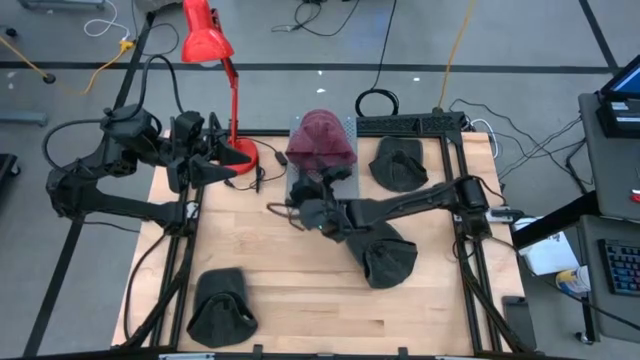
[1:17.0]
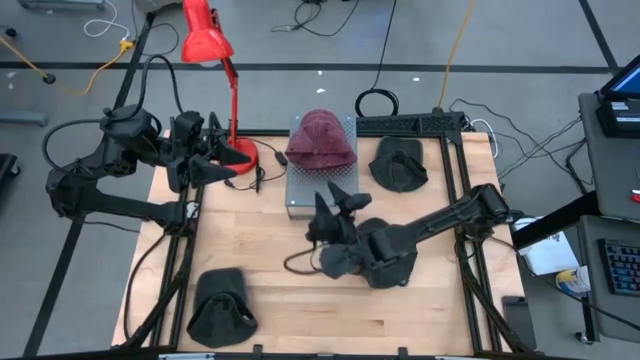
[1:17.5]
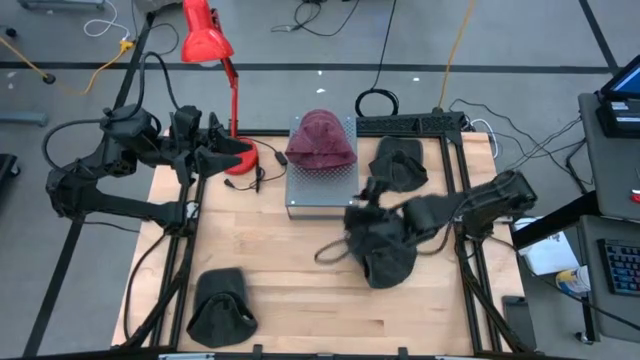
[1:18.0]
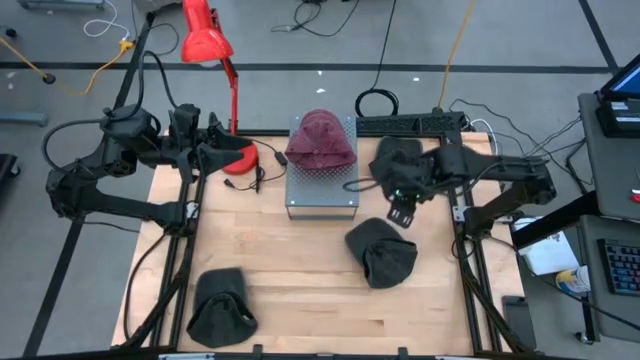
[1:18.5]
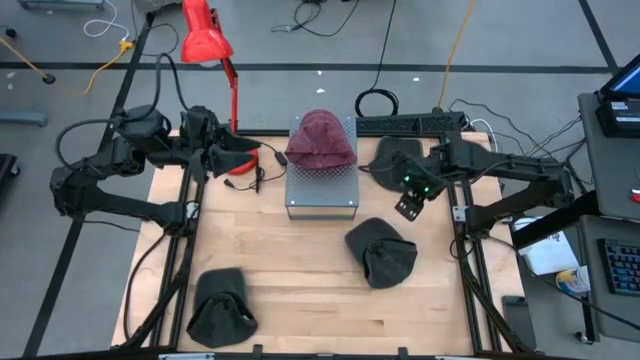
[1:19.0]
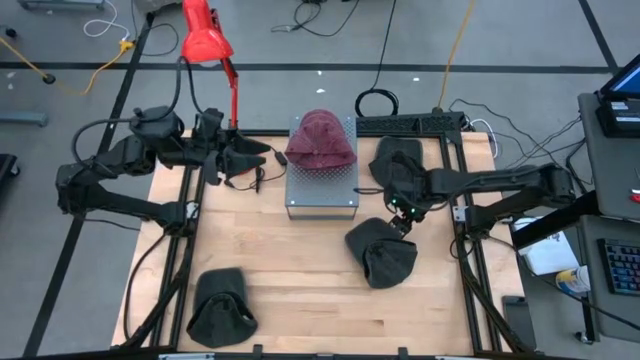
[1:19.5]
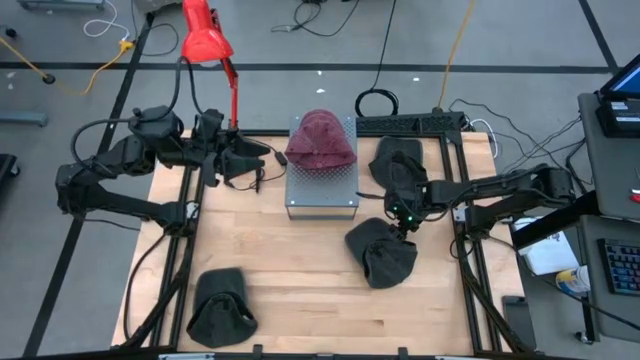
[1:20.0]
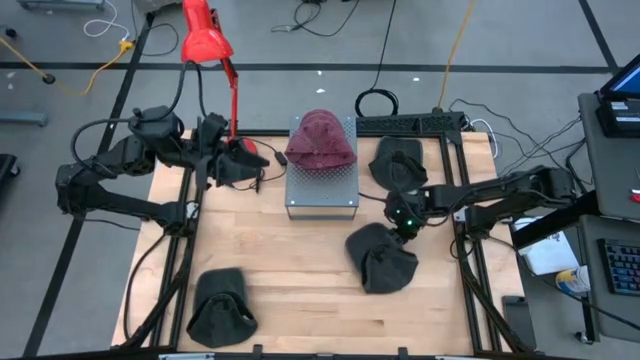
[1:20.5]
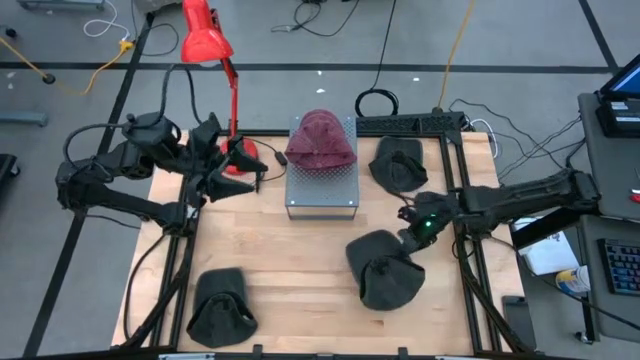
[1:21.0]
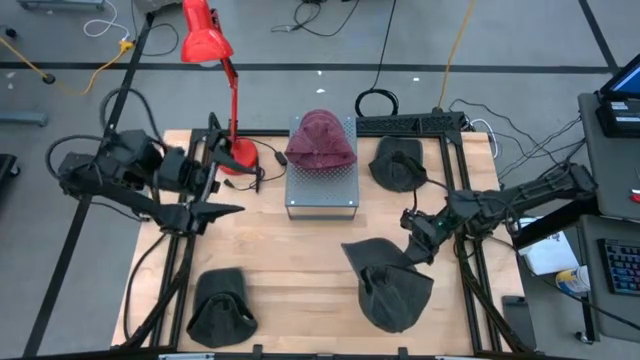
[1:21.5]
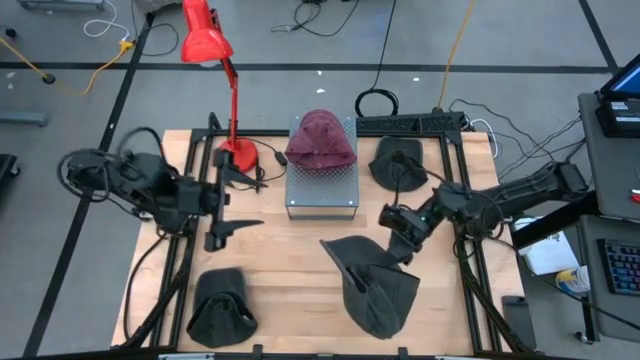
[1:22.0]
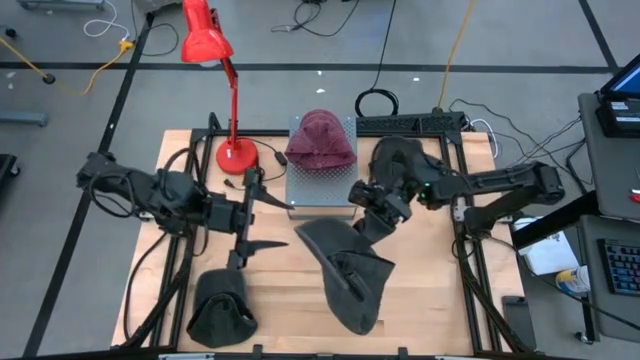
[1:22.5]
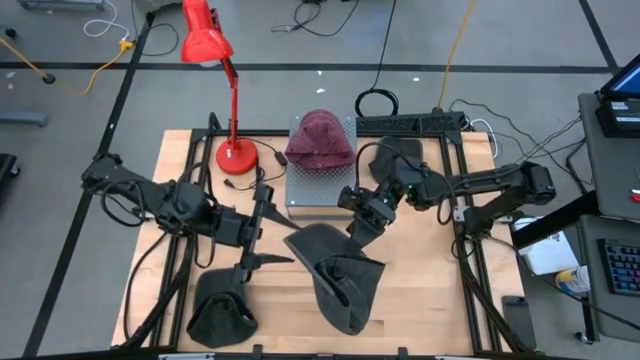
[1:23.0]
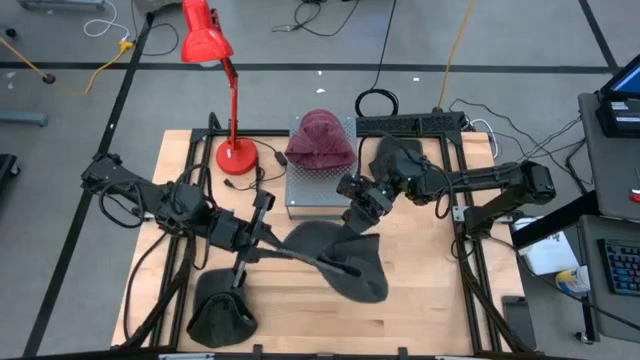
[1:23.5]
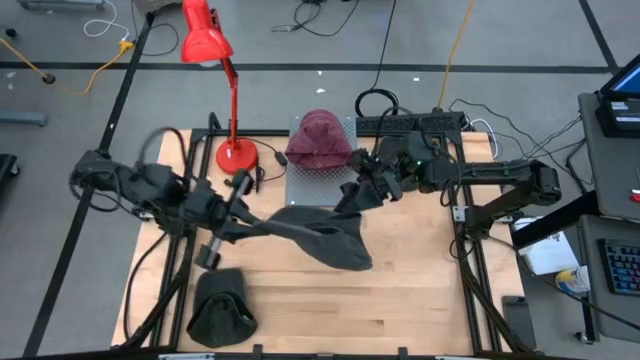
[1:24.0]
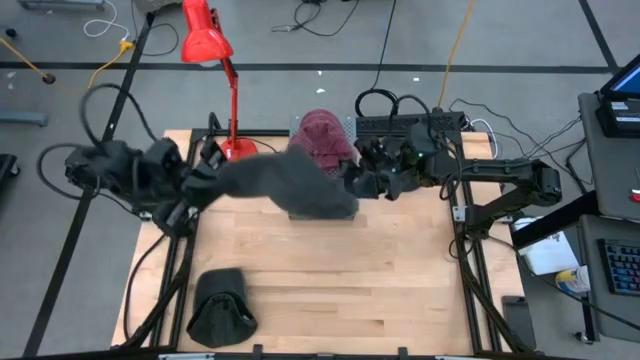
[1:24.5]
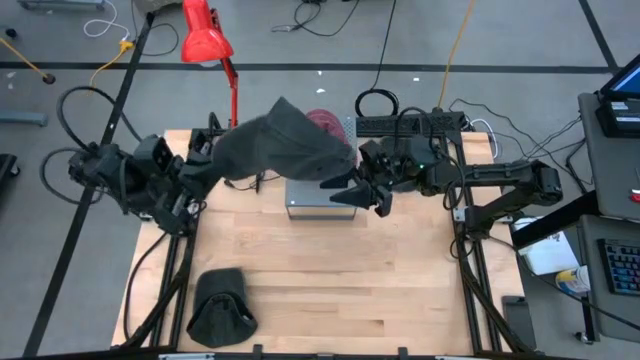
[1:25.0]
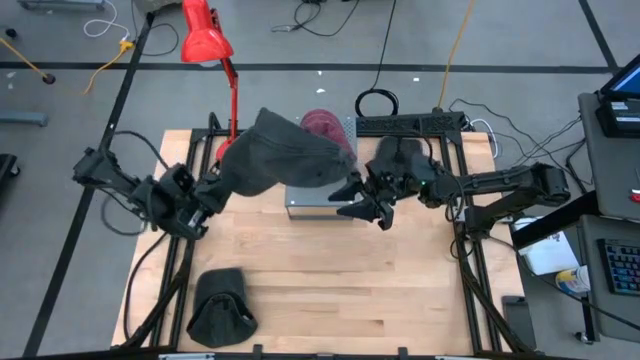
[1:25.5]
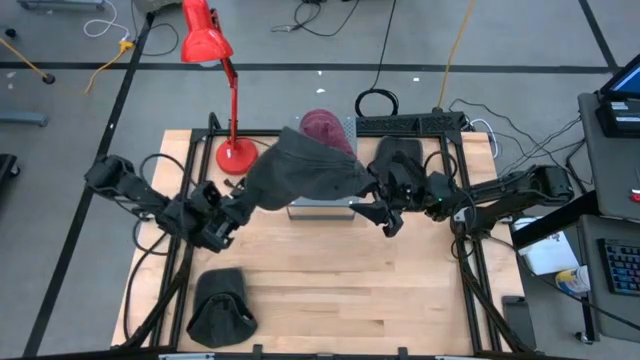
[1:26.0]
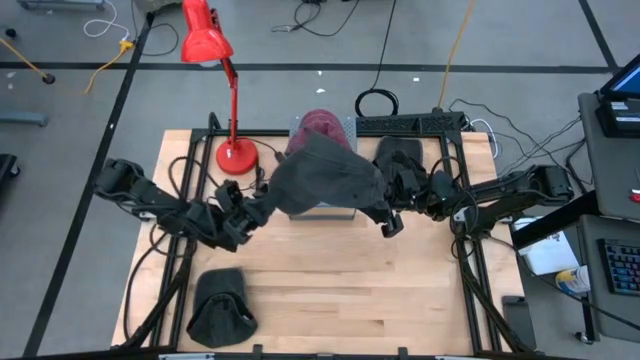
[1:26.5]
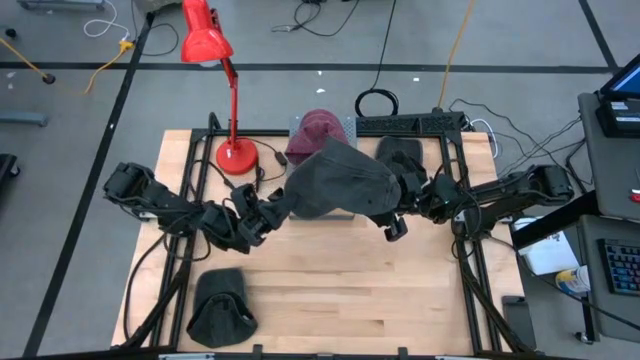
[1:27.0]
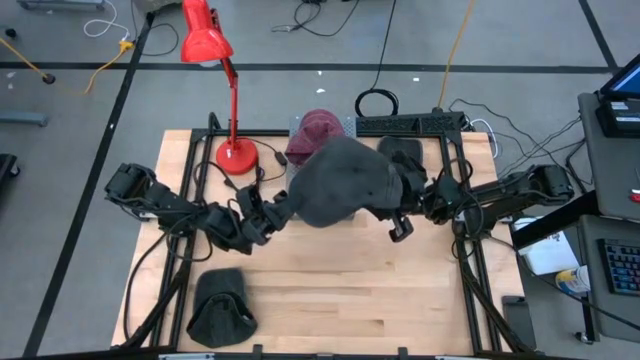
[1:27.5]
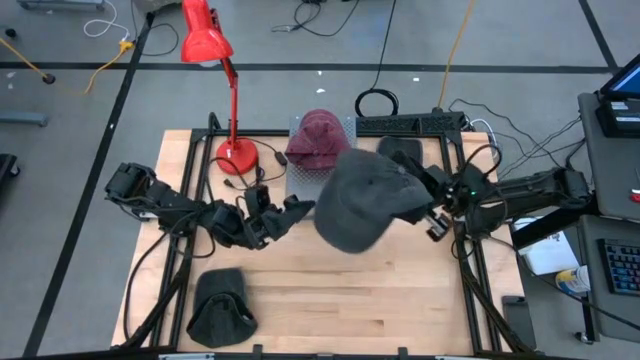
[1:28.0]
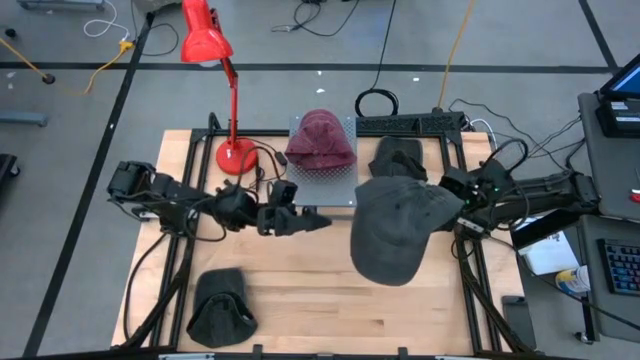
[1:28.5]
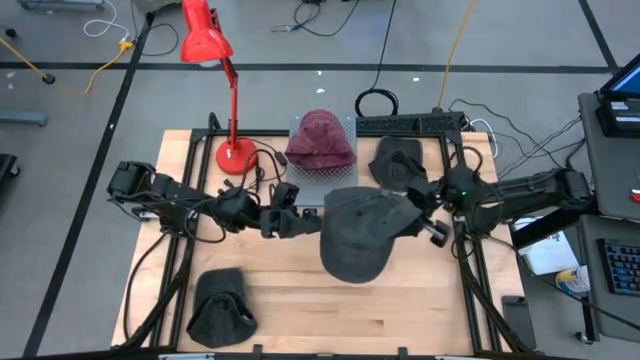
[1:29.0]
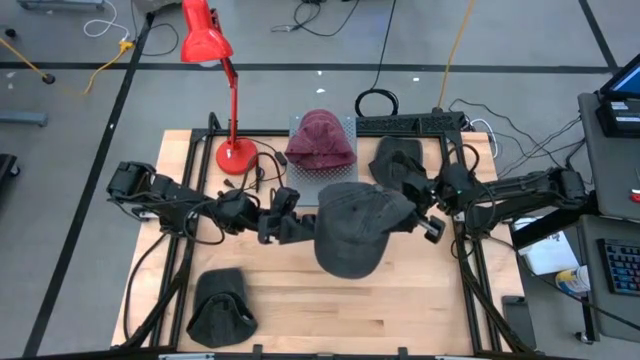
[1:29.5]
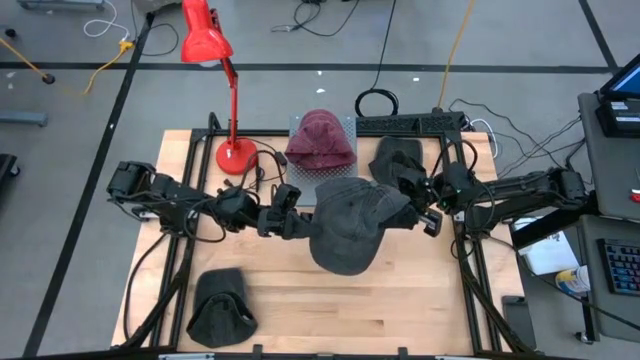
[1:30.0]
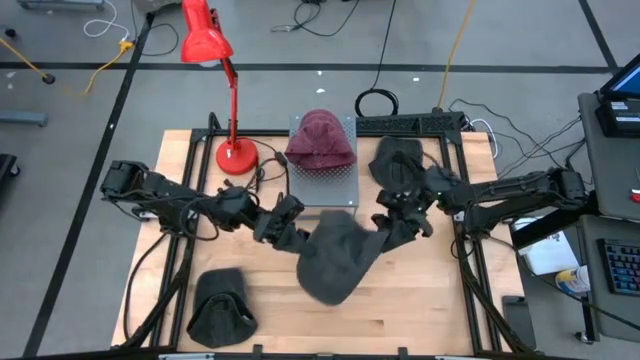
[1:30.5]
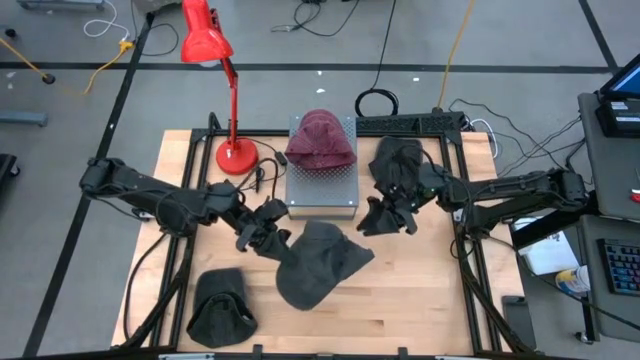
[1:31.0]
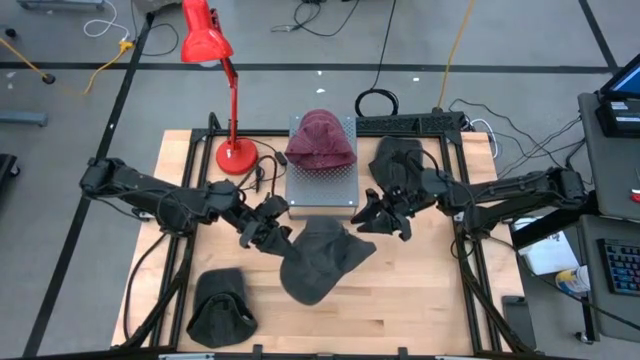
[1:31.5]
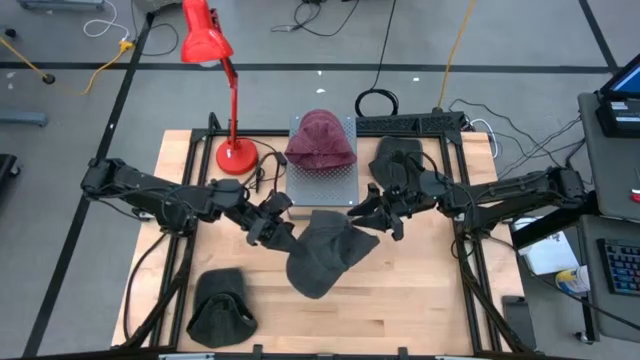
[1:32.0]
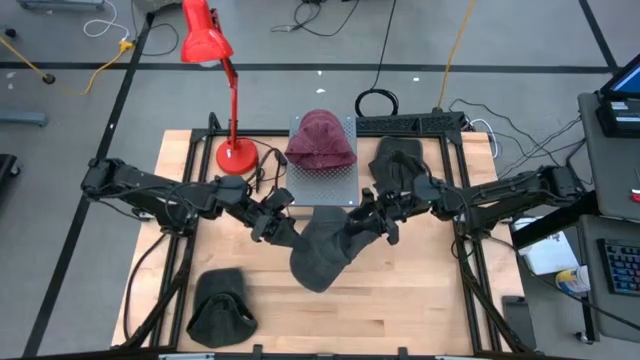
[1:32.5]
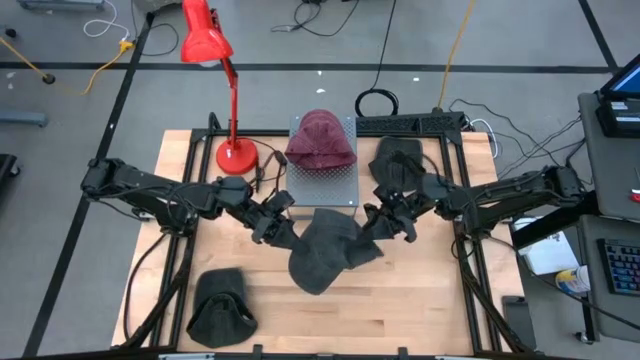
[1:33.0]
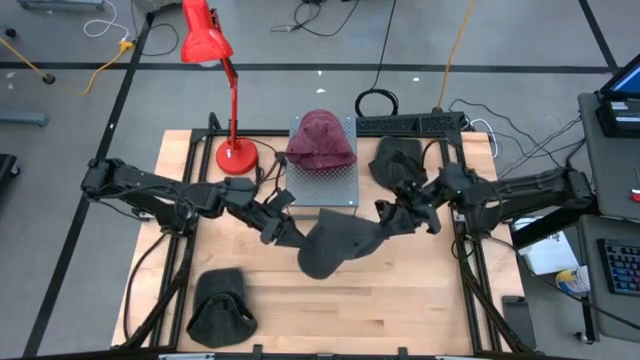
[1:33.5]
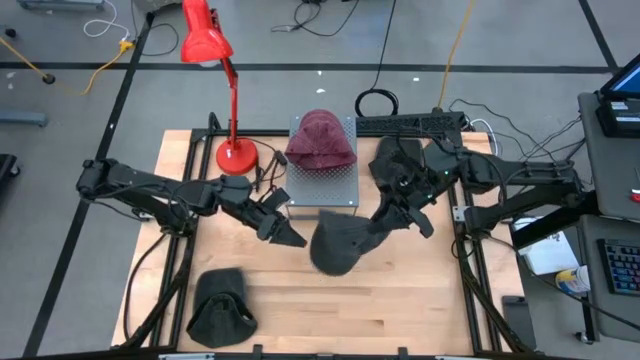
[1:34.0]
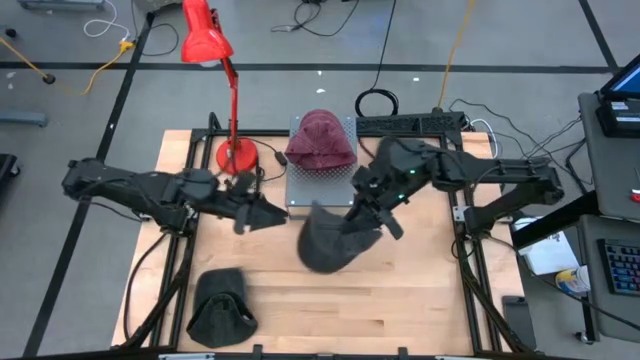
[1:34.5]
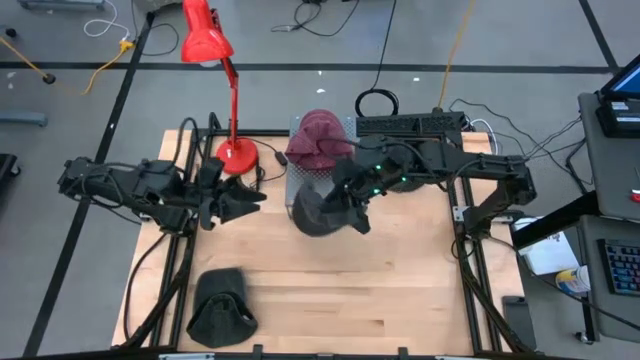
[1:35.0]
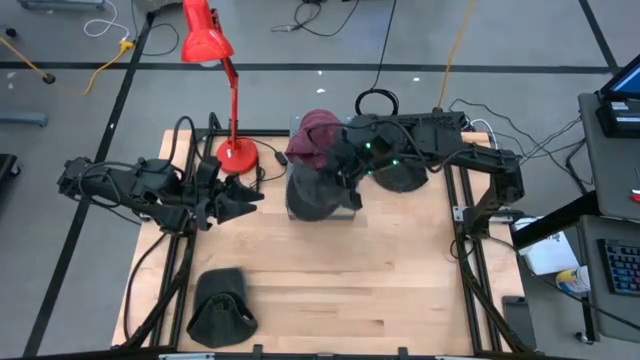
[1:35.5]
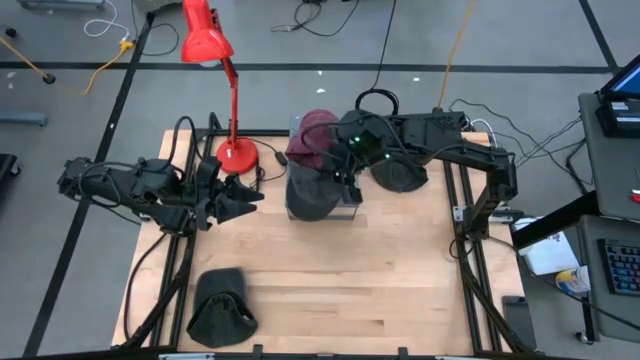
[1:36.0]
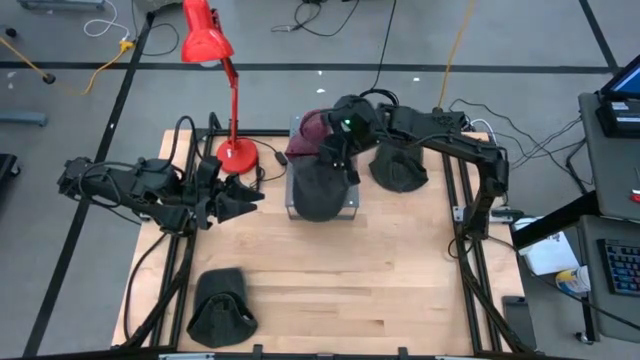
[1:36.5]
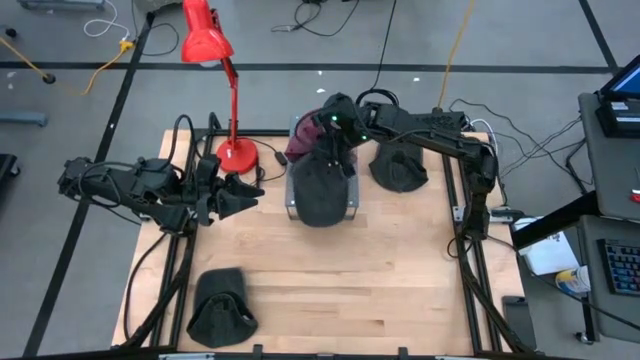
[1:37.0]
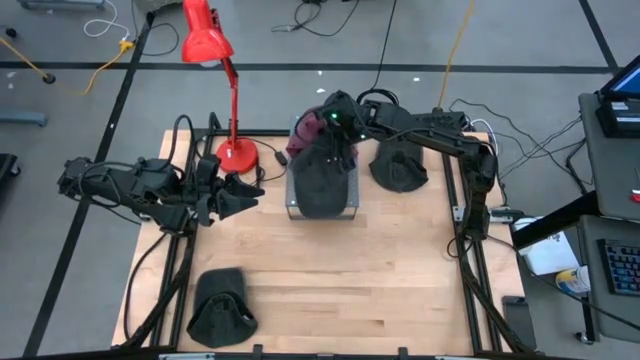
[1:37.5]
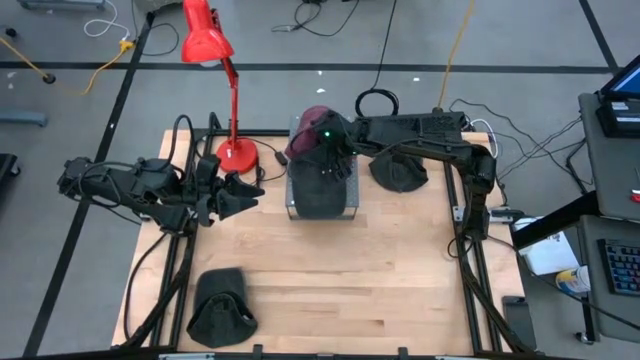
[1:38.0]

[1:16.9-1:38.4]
Task: Pick & Place hat
Put the middle black cap on the shelf

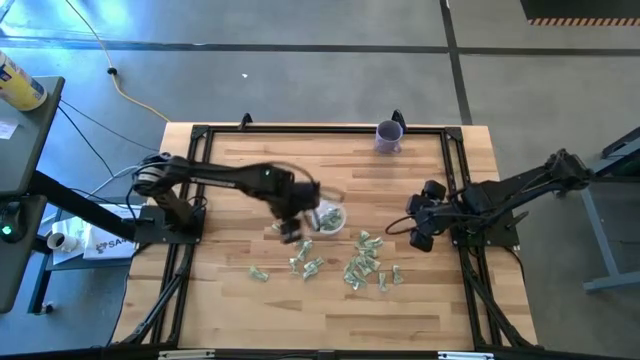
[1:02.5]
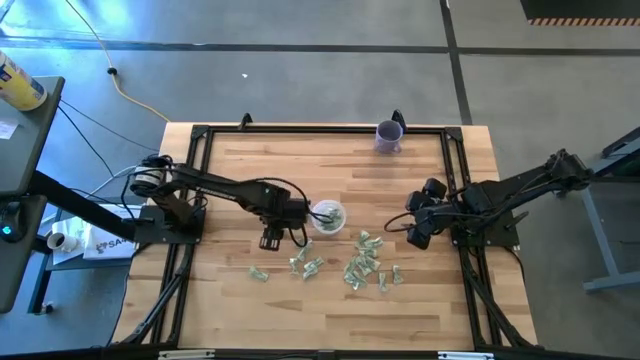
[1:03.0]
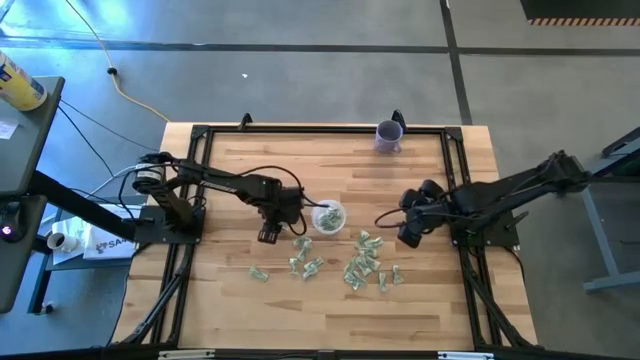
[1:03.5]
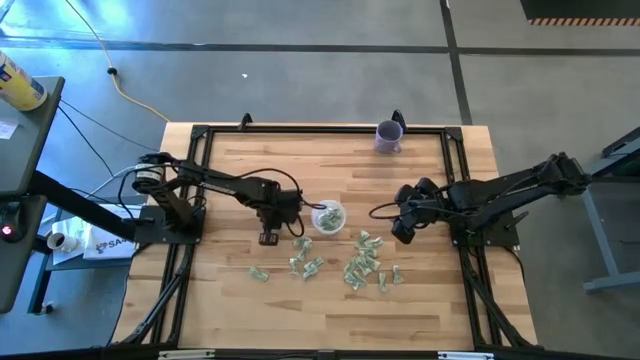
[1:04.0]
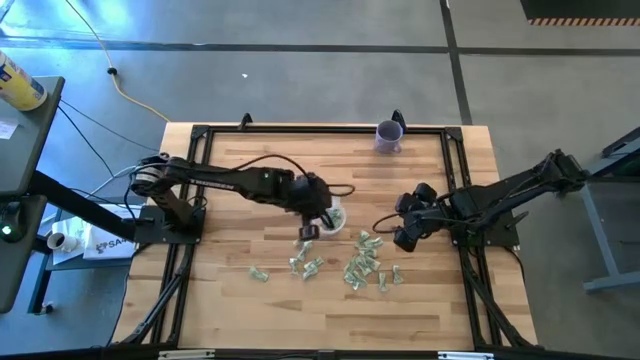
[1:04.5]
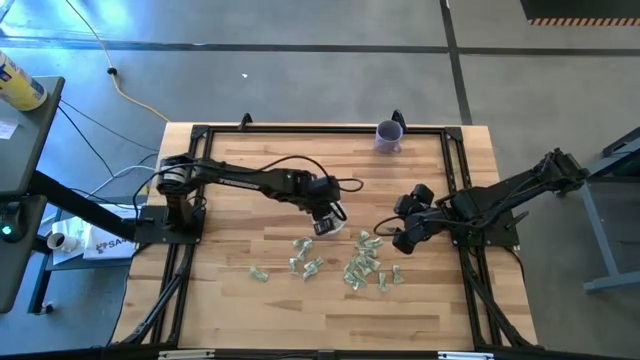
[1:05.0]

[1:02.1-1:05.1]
Task: Pick and place Stevia / Truvia into bins
Put the green stevia packet into the transparent bin
